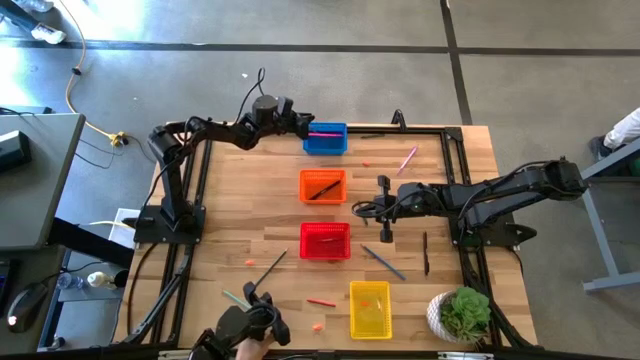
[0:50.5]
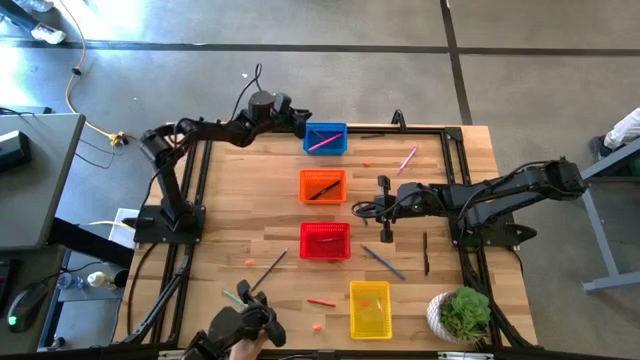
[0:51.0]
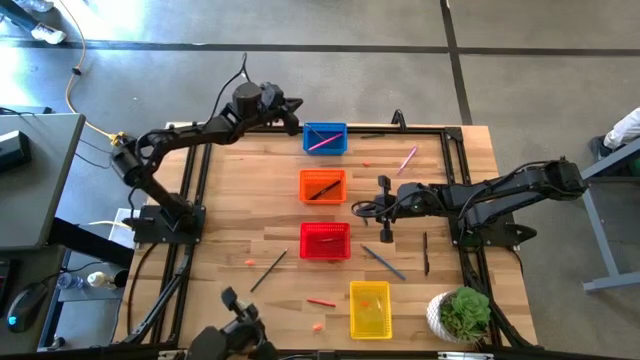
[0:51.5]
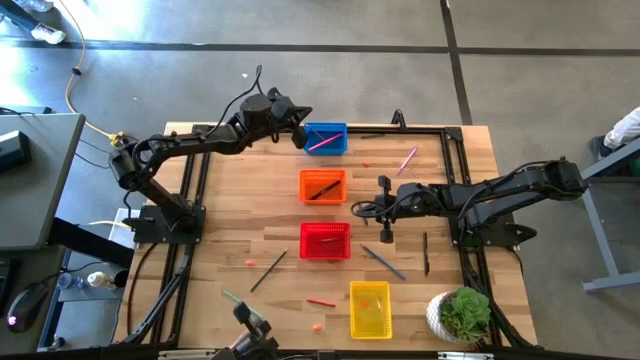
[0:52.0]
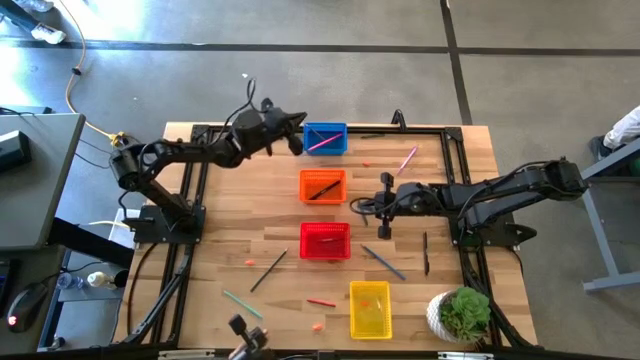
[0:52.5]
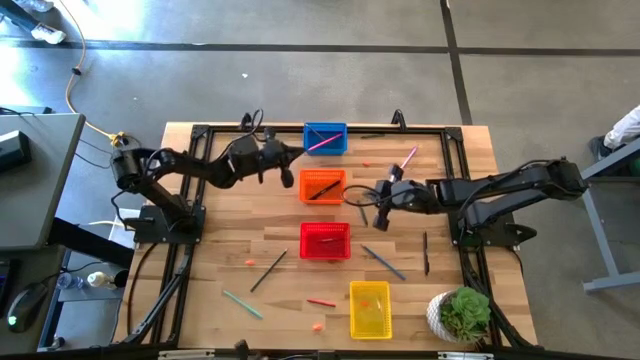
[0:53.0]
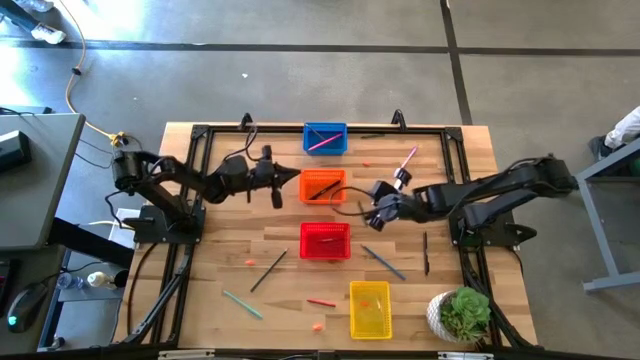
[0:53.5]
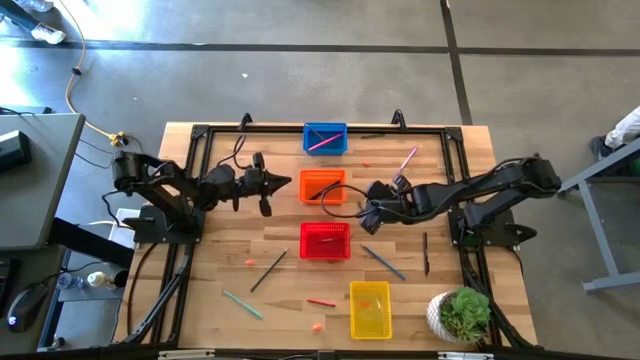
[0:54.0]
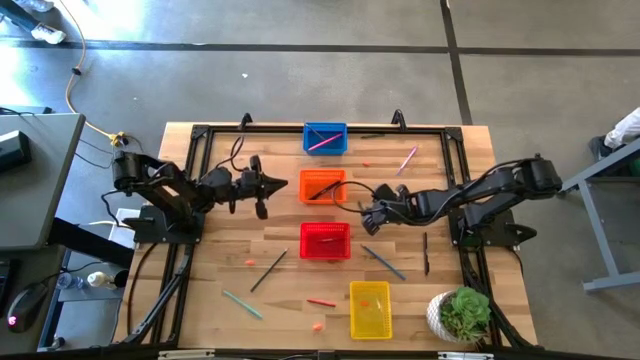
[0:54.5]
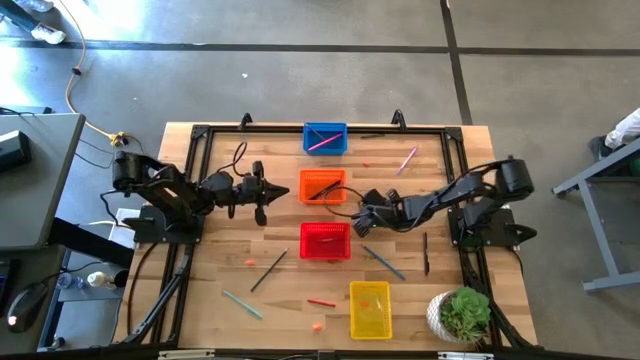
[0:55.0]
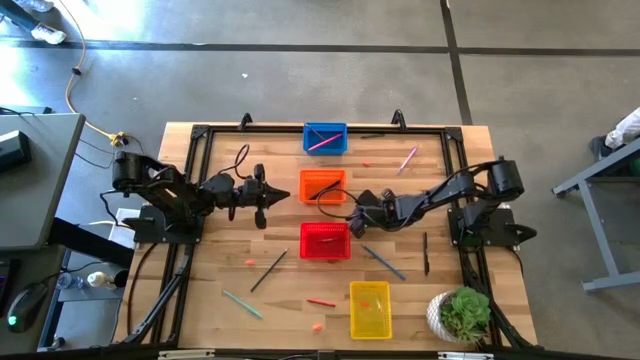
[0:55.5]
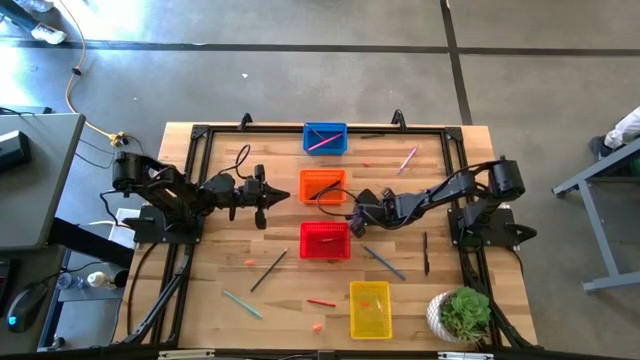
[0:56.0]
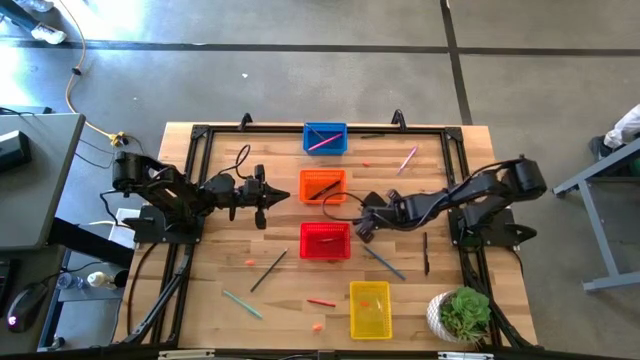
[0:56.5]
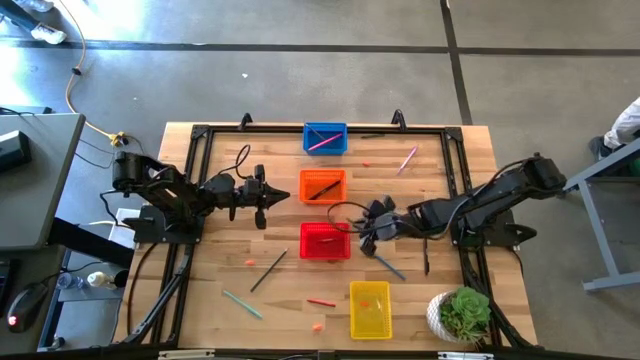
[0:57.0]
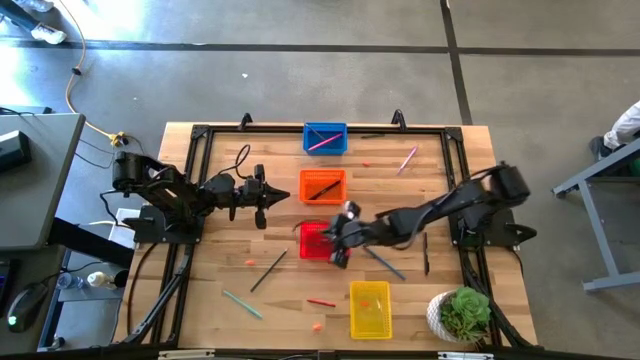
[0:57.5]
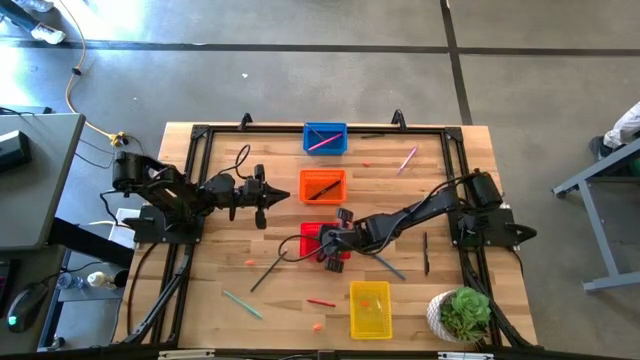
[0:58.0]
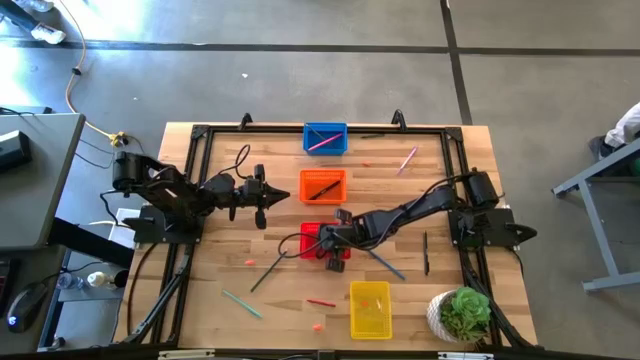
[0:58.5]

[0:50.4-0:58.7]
Task: Sort crayons/erasers/pens/pencils in bins
Put the green crayon into the red bin

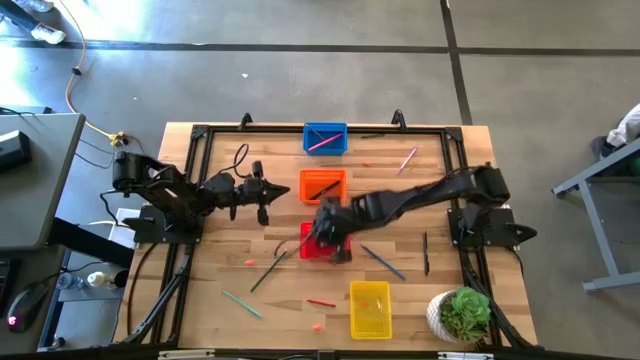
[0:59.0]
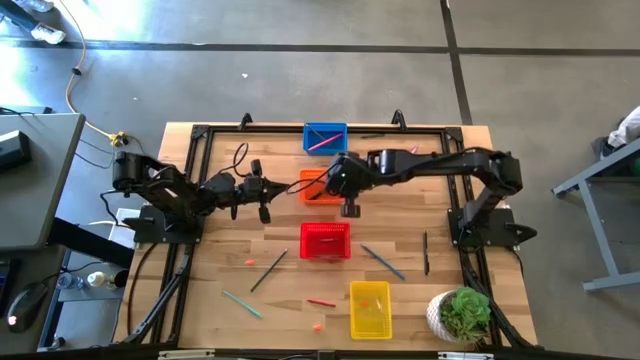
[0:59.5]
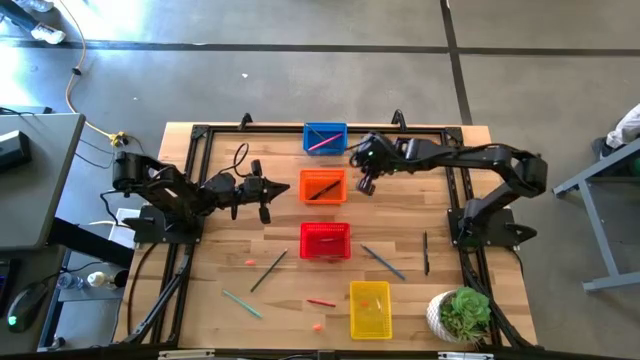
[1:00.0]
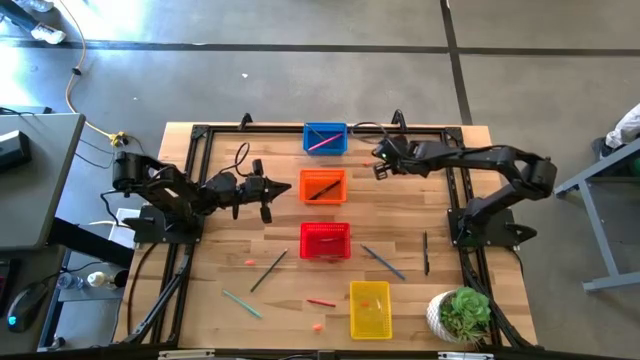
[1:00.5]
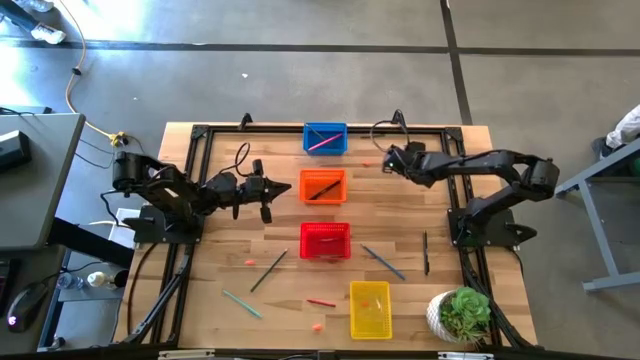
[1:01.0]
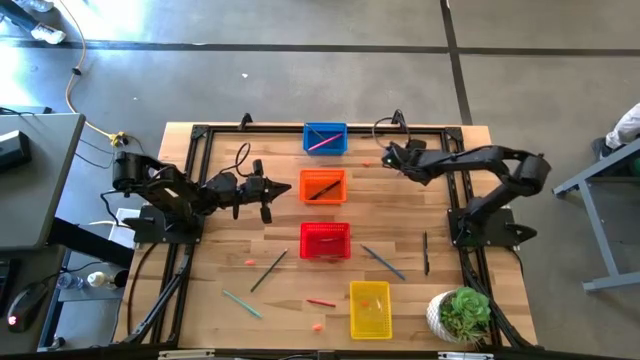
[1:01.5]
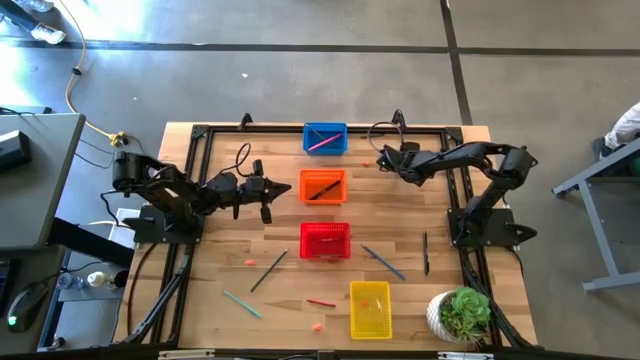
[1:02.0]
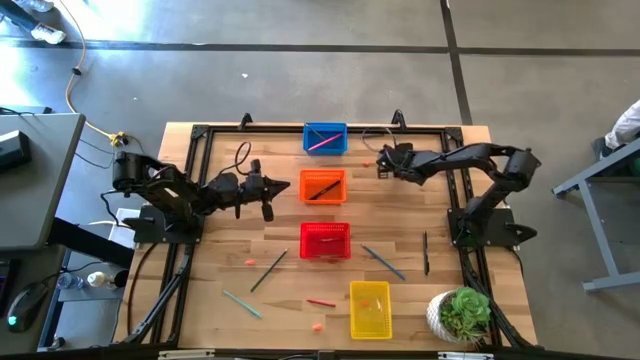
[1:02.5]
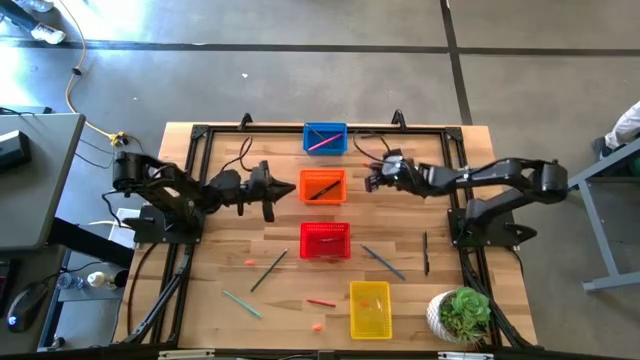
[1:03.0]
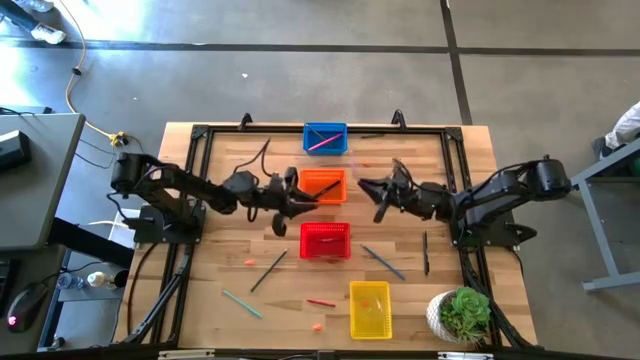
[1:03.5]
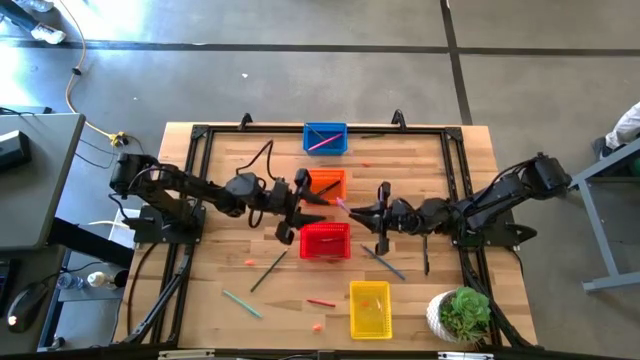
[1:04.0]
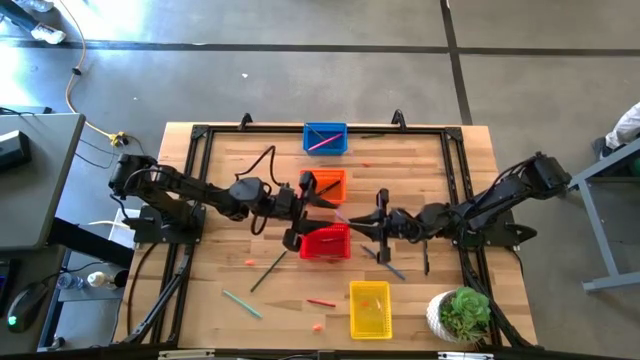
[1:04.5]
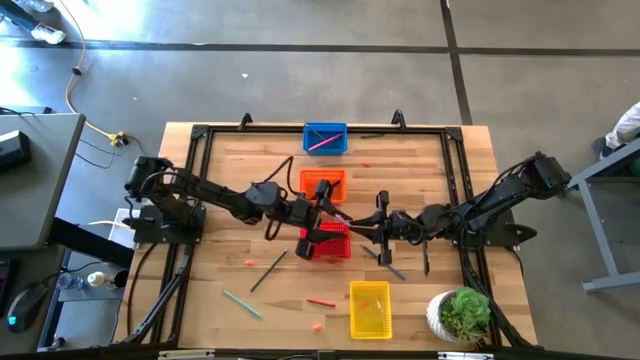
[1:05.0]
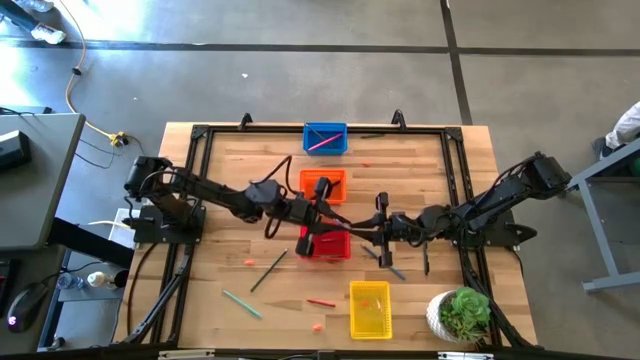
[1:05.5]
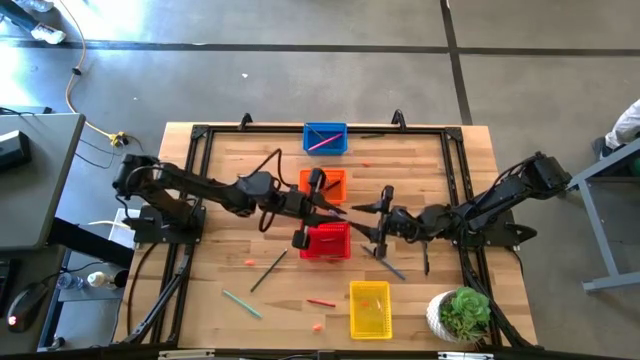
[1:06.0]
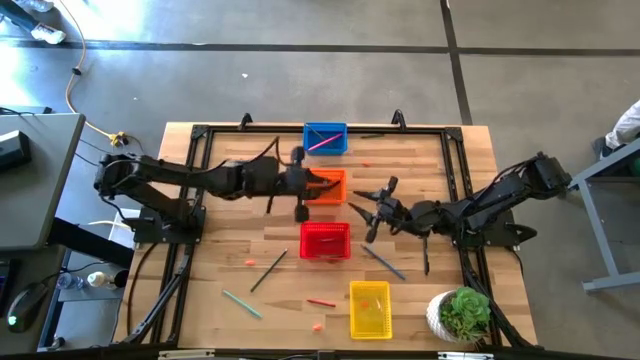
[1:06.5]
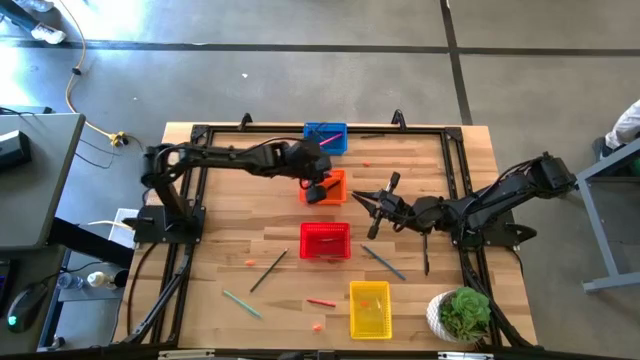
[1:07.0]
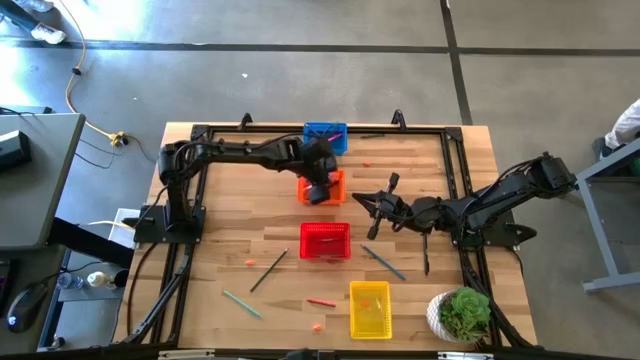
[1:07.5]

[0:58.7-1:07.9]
Put the violet pen into the orange bin

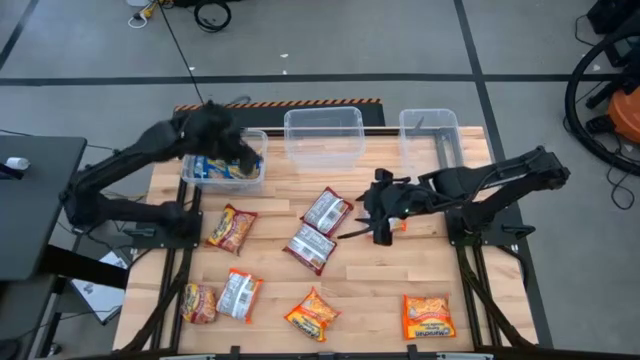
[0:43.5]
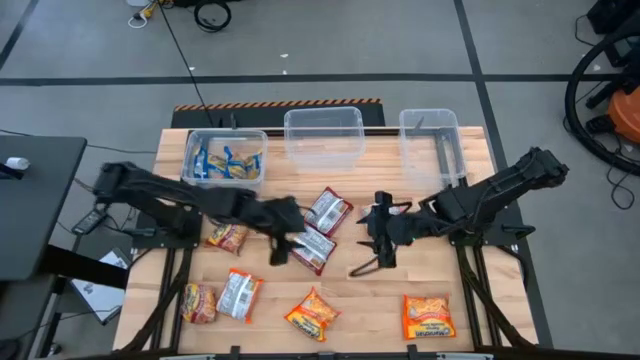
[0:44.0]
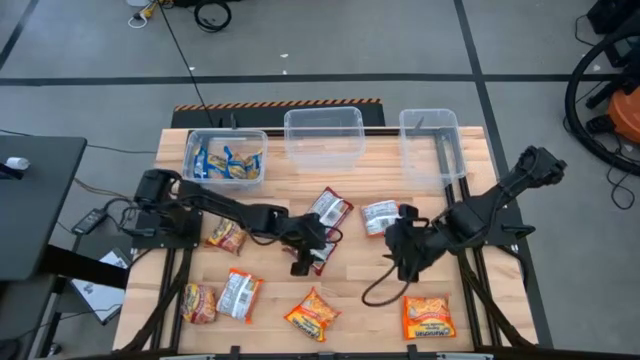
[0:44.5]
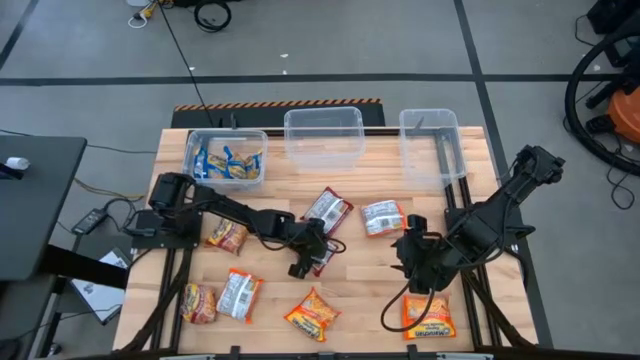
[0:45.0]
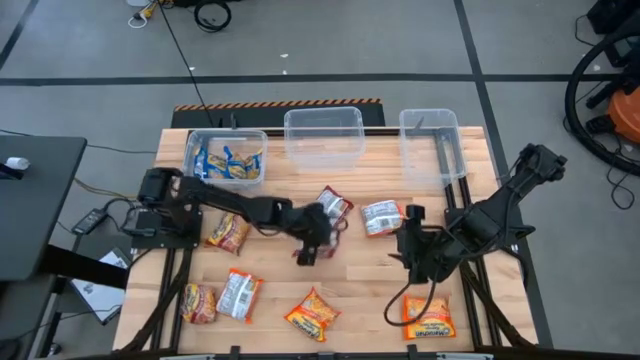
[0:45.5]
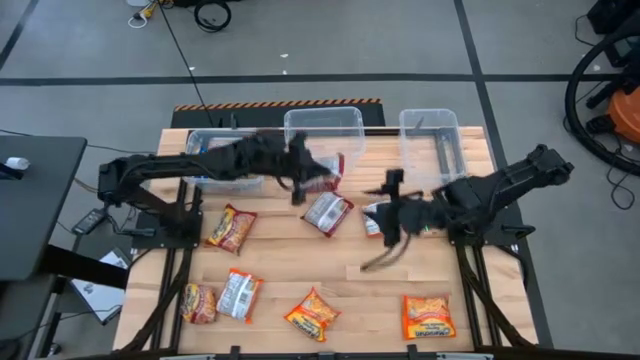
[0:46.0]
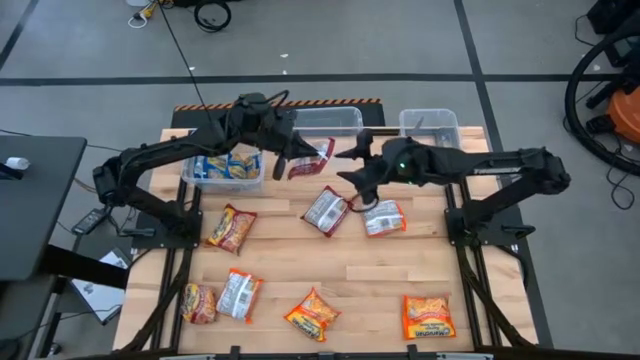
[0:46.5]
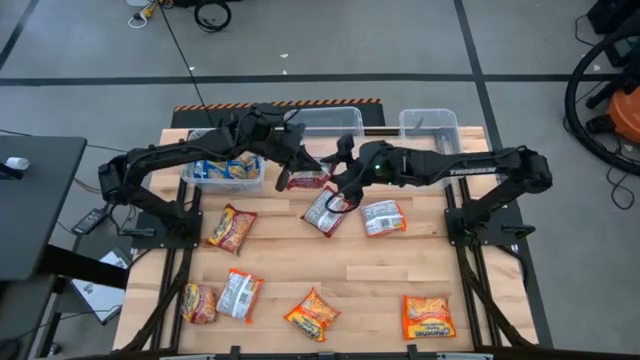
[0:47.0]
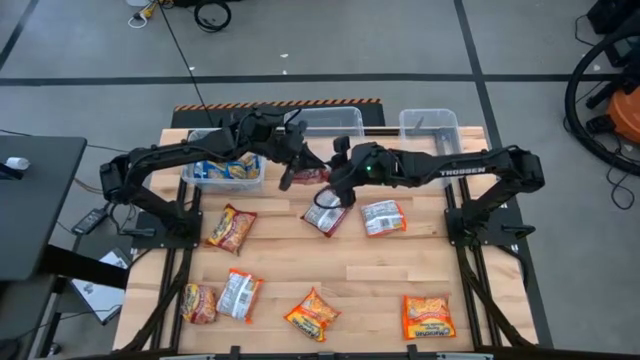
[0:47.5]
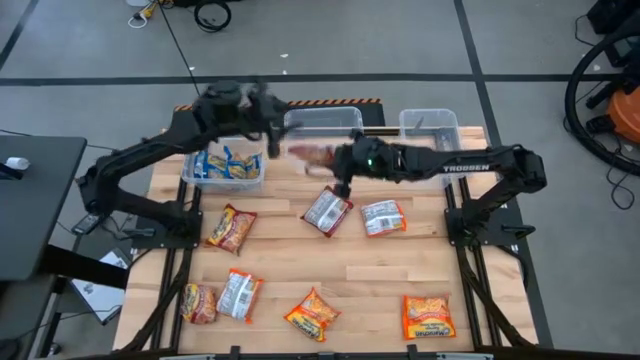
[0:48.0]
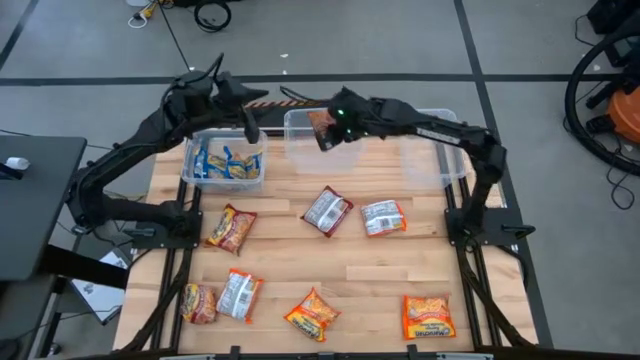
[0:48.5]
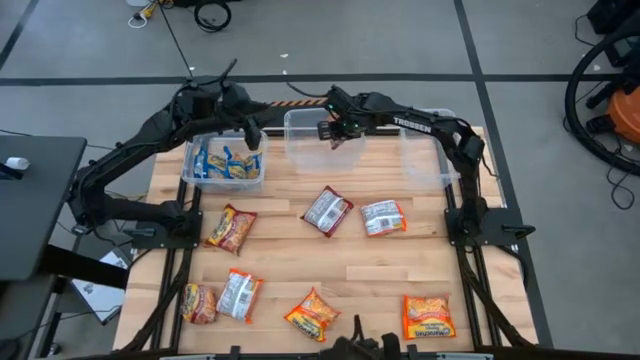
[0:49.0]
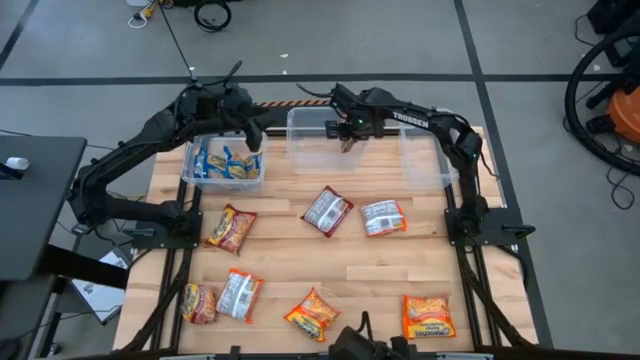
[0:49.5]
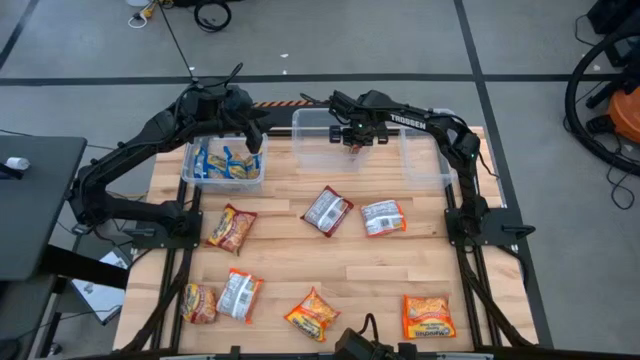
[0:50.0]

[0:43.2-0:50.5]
Task: Sort Maruchan noodles
Put the bottom right red noodle pack into the center transparent bin
